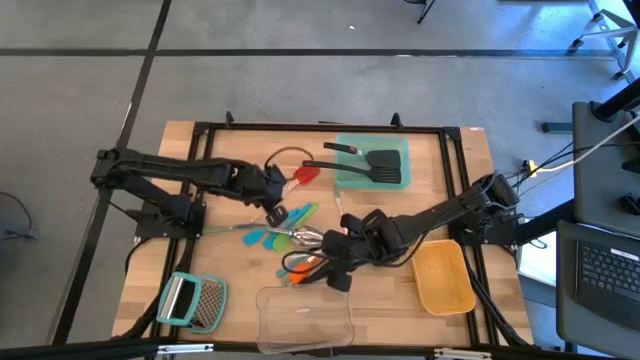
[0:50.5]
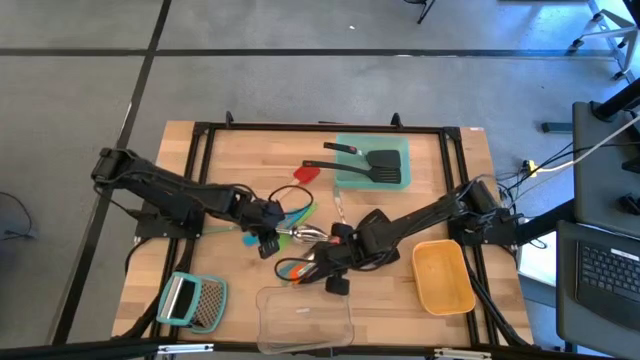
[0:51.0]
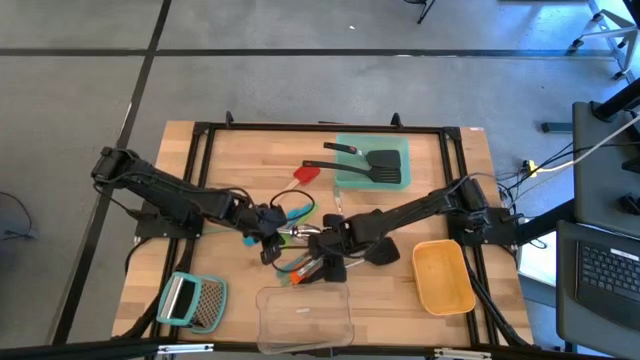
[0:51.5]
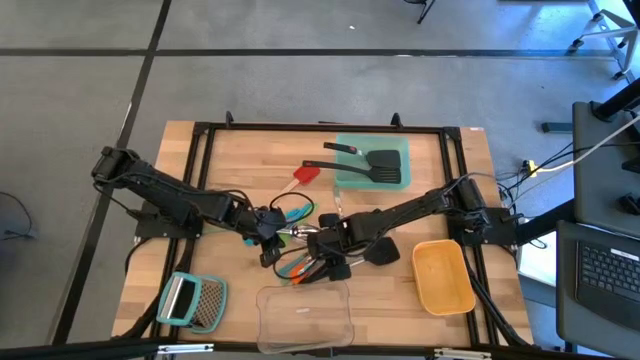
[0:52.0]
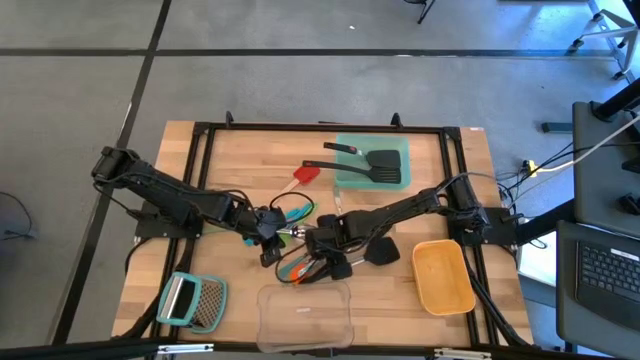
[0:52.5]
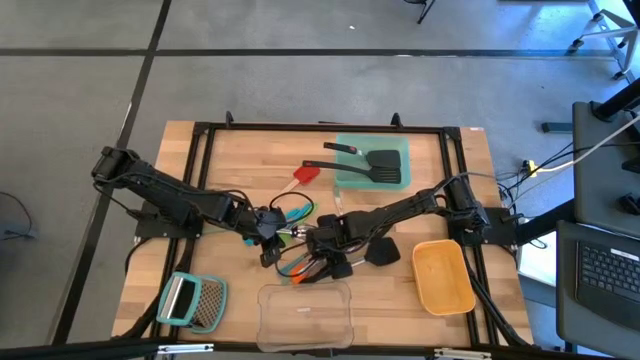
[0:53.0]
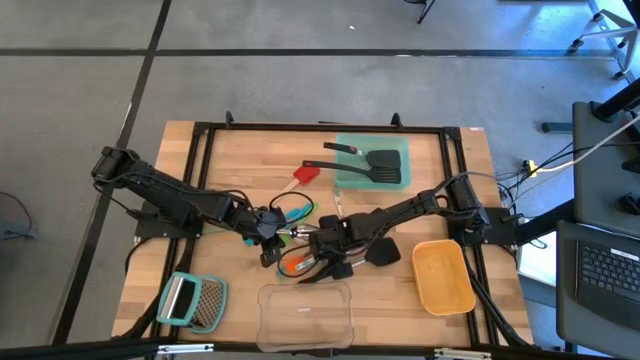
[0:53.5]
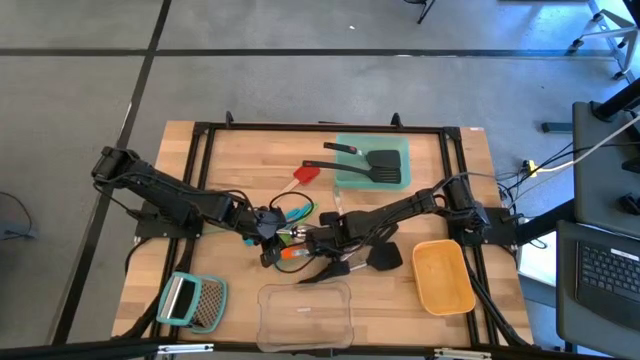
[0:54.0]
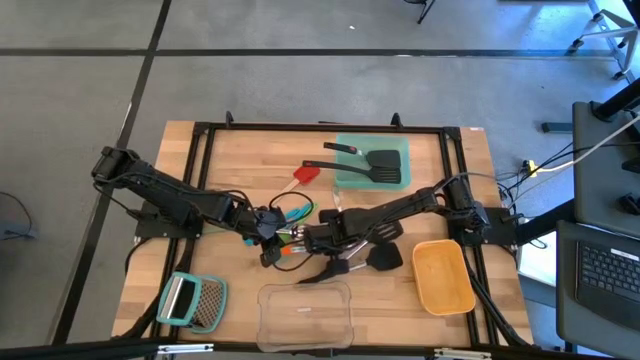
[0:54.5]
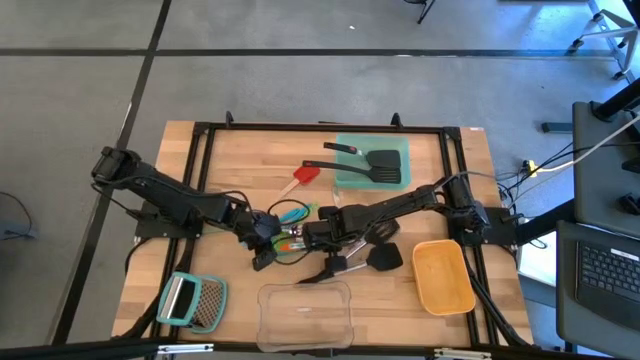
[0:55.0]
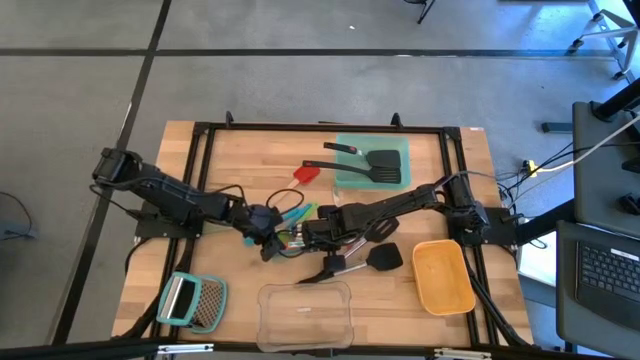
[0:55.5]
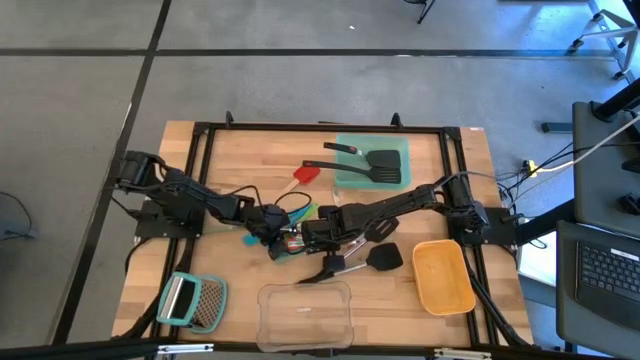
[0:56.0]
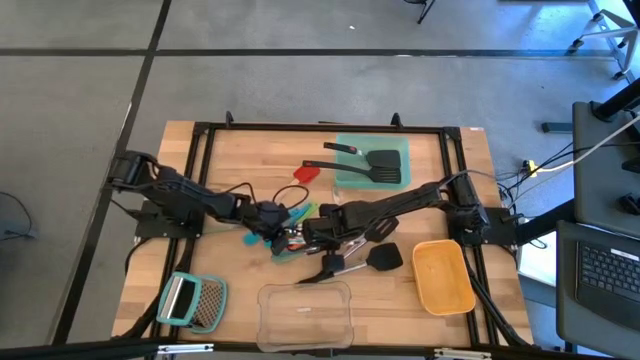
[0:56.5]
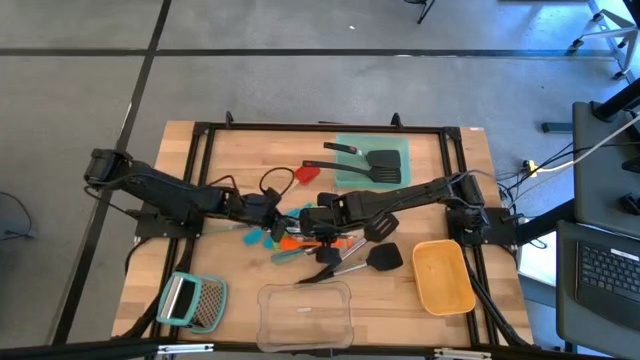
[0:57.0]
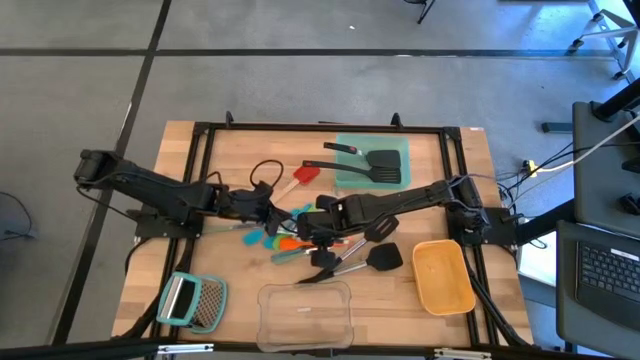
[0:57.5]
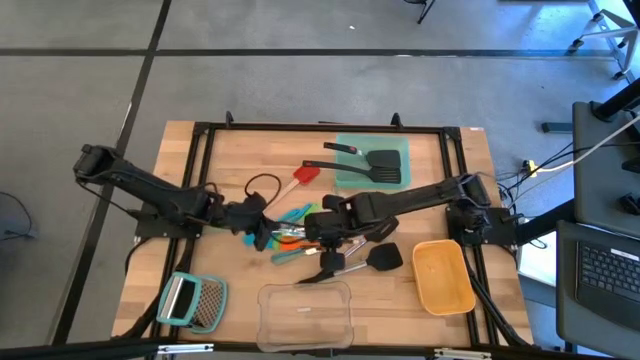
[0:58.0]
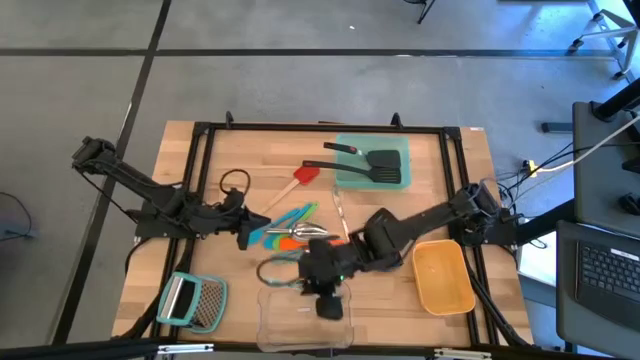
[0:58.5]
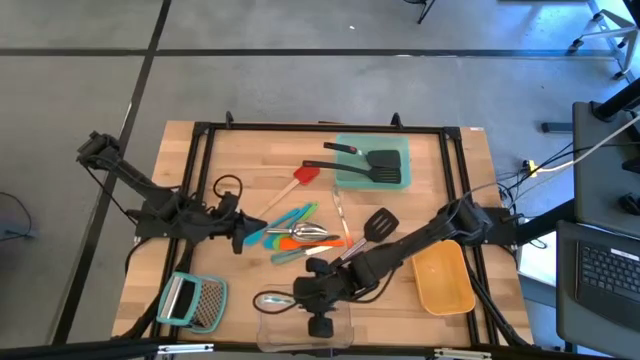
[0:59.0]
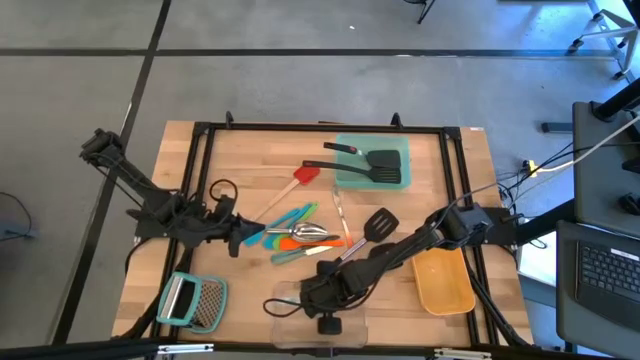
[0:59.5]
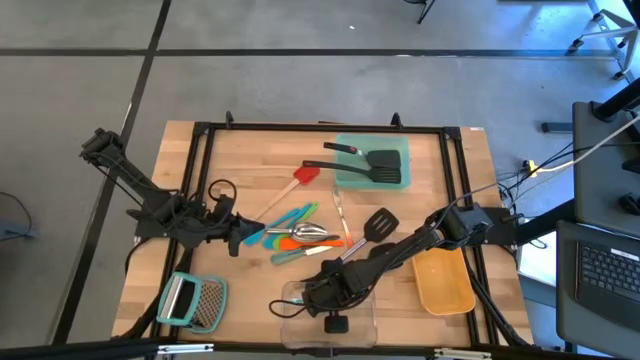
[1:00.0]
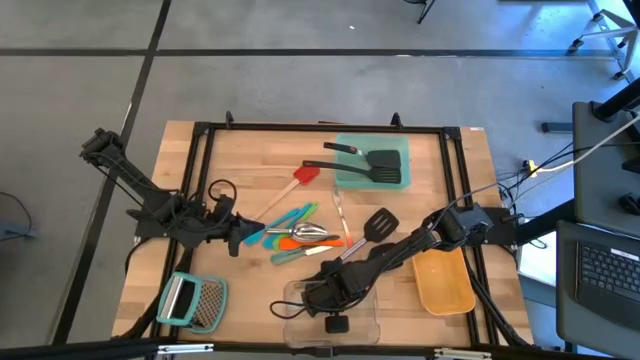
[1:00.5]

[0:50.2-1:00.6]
Task: Pick & Place Kitchen Items
Put the blue table knife into the transparent bin

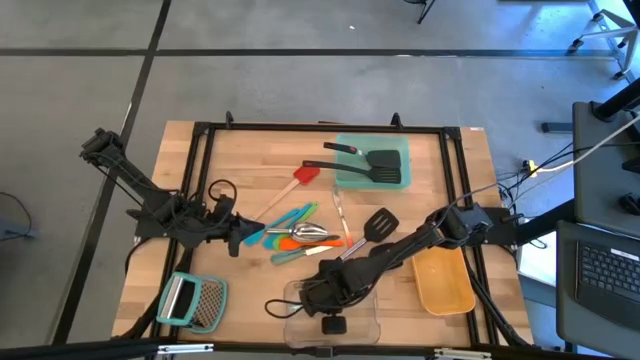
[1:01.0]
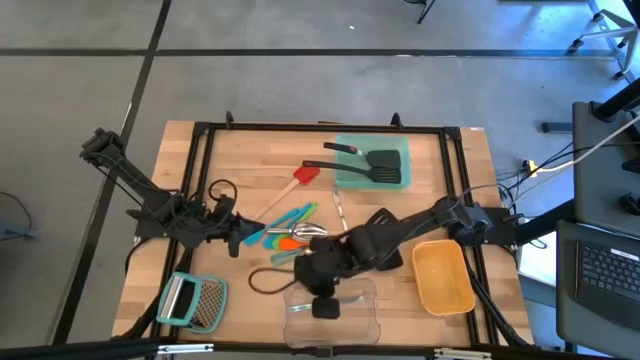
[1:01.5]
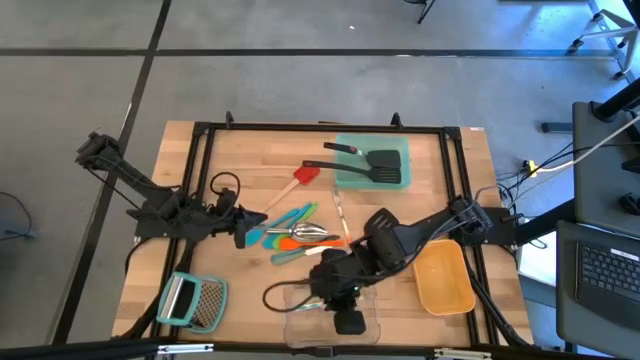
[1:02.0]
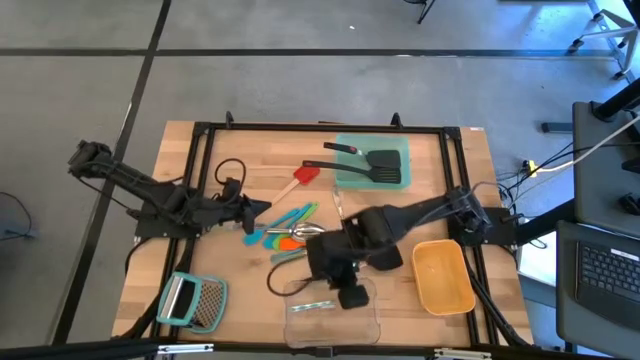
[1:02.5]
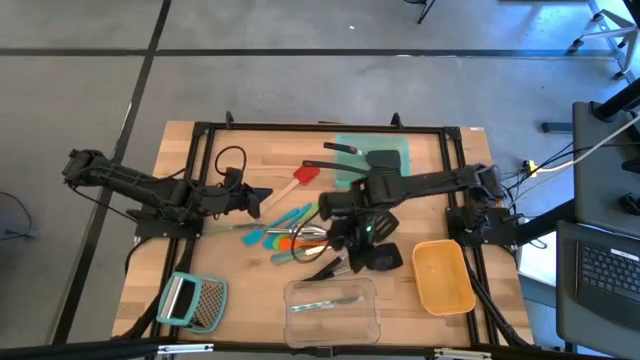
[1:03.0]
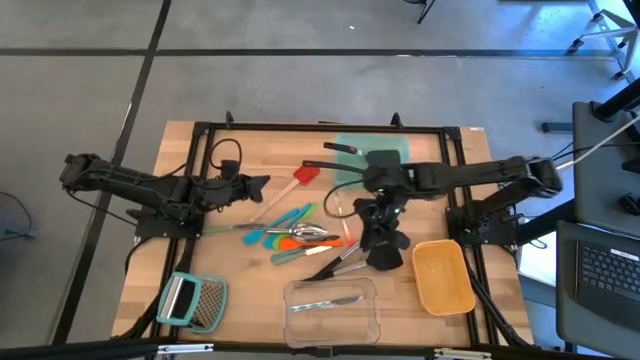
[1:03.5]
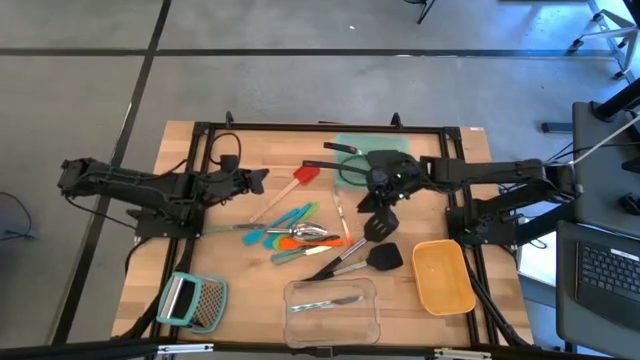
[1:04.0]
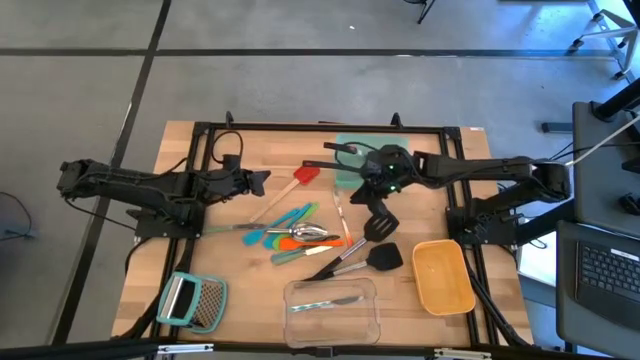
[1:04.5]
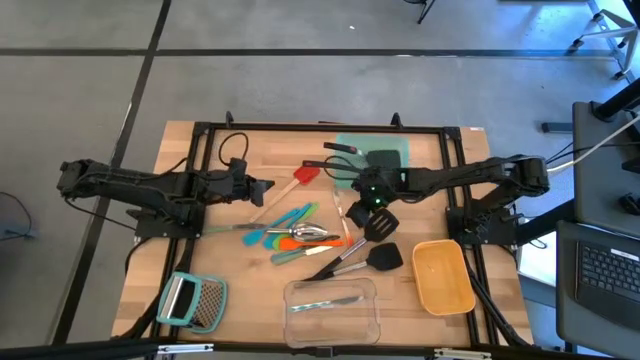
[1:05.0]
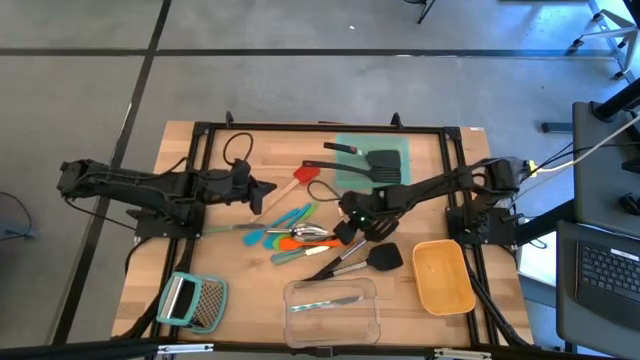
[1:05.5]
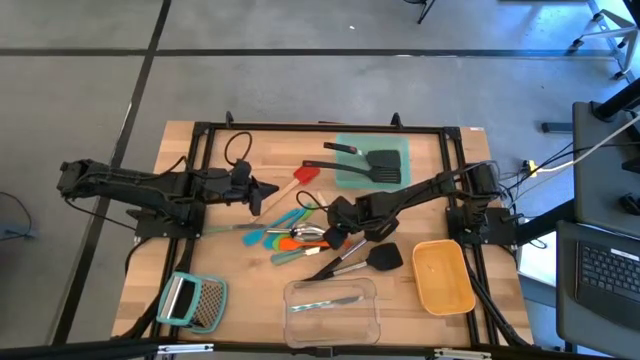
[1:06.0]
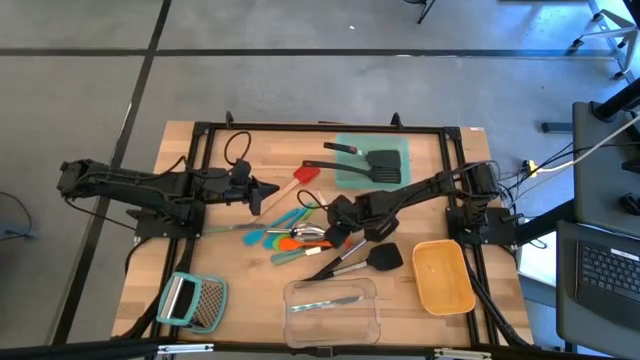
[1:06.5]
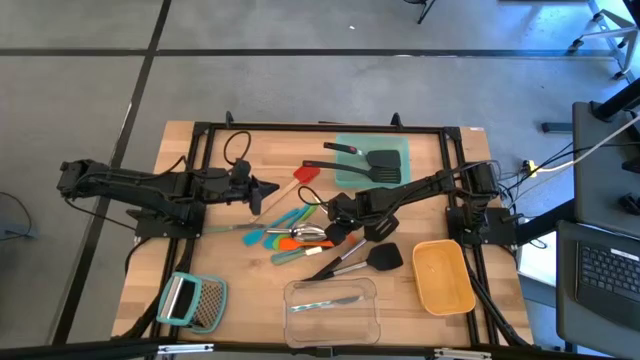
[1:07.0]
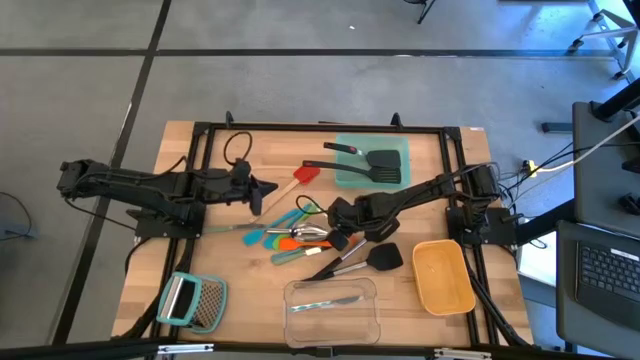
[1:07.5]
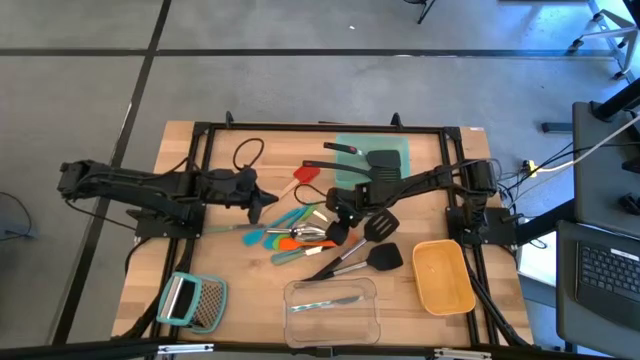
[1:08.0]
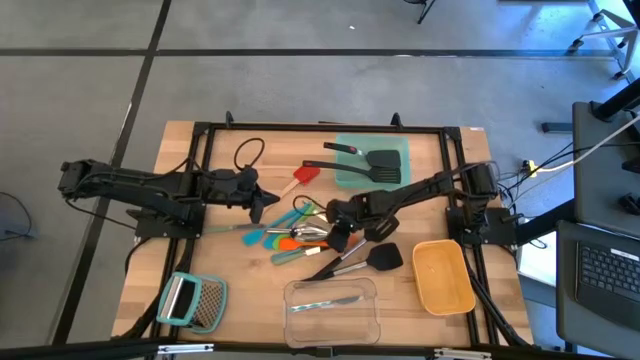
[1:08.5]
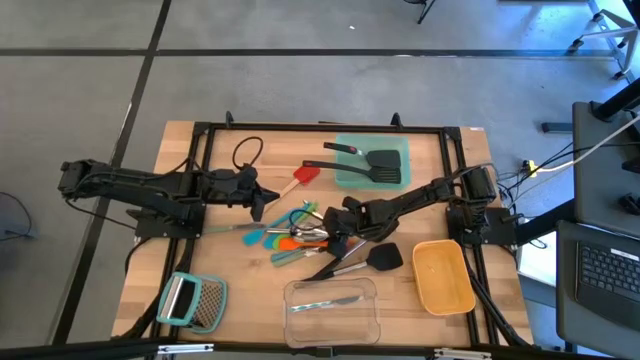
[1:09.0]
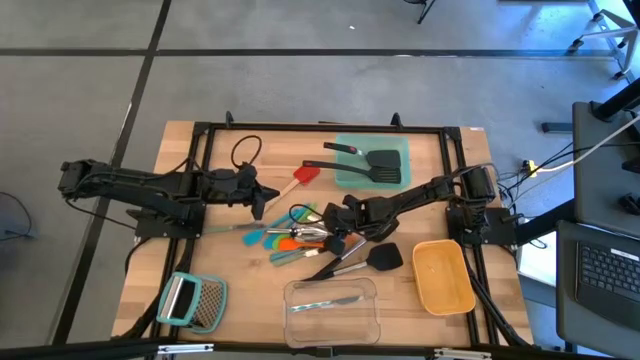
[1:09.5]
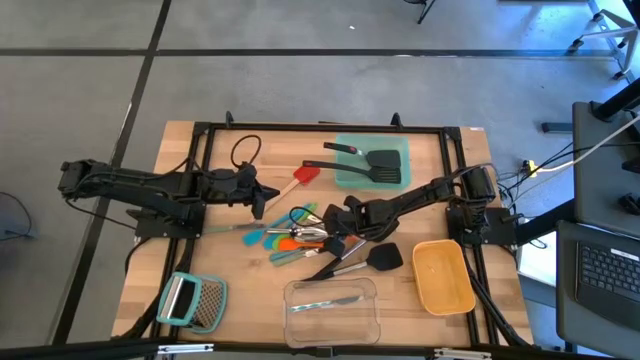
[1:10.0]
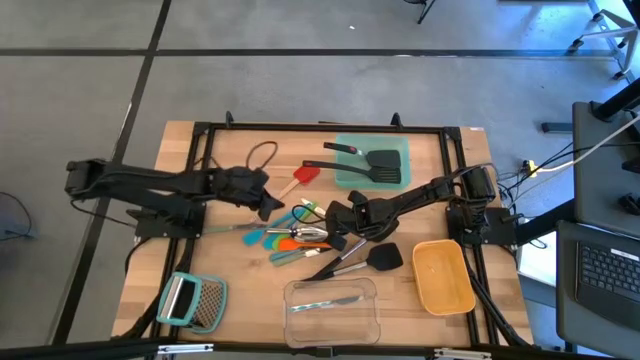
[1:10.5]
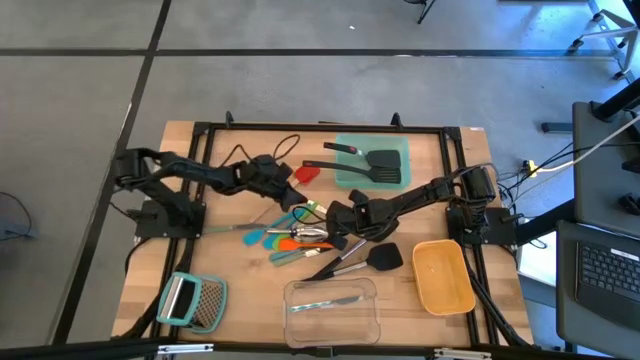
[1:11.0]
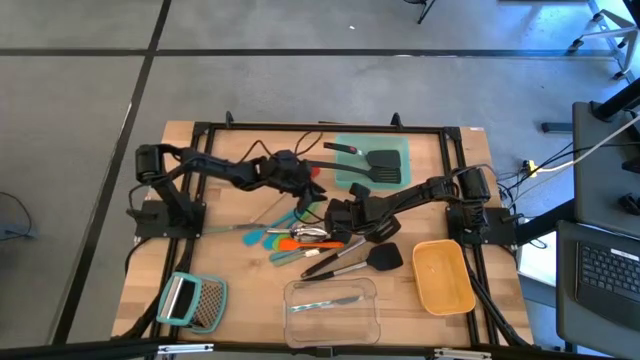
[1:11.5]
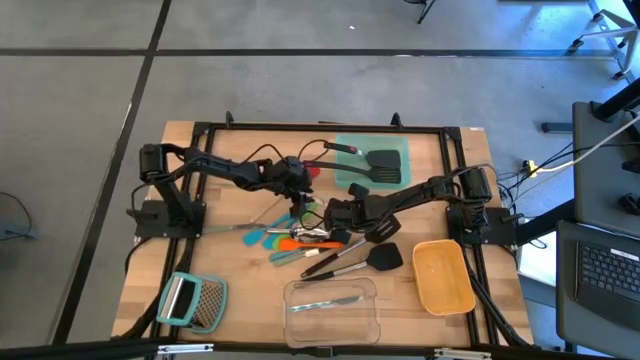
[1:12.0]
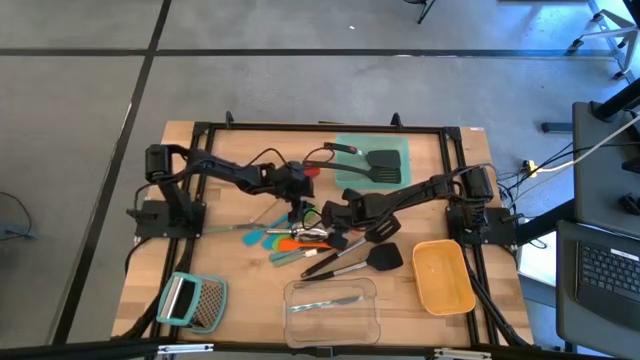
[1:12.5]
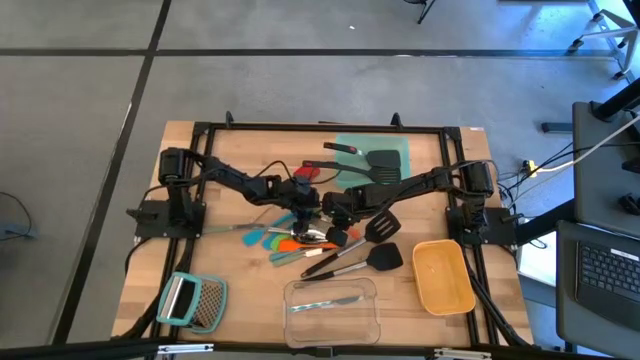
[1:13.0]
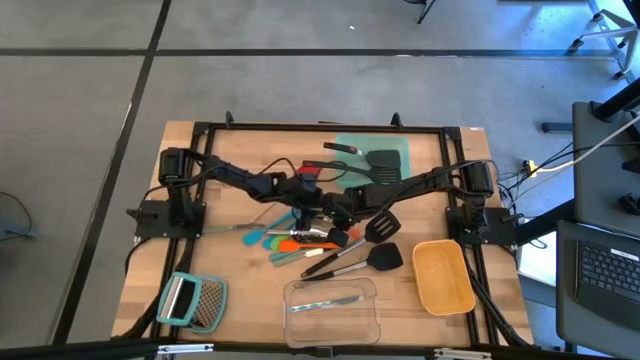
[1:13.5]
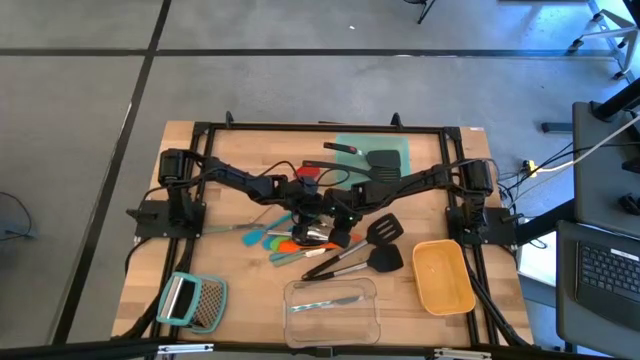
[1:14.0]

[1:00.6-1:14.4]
Put the orange table knife into the transparent bin
